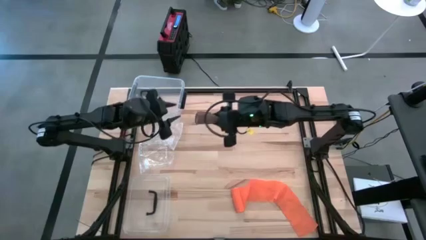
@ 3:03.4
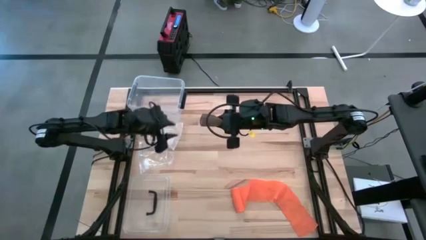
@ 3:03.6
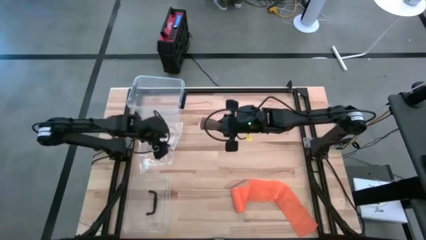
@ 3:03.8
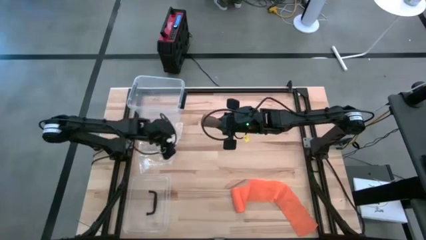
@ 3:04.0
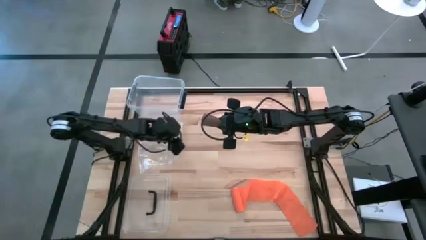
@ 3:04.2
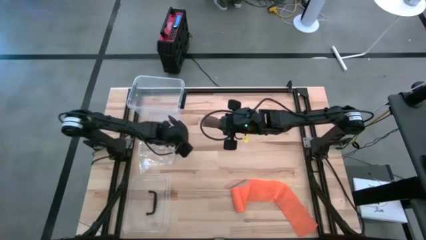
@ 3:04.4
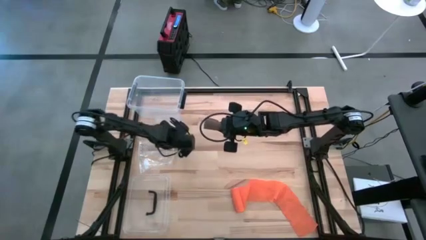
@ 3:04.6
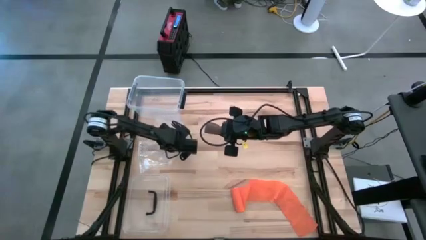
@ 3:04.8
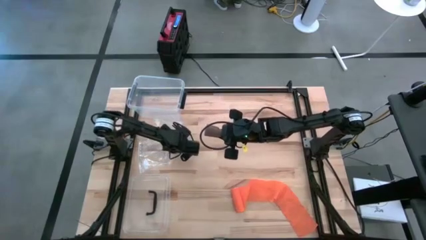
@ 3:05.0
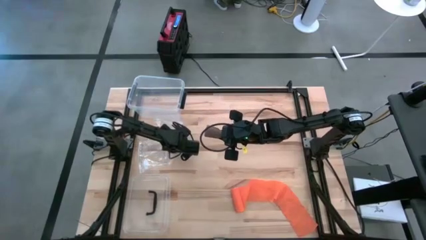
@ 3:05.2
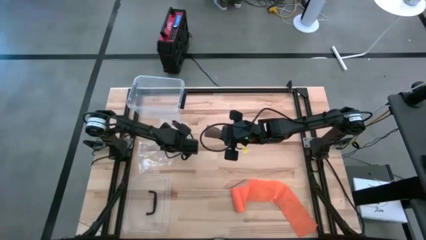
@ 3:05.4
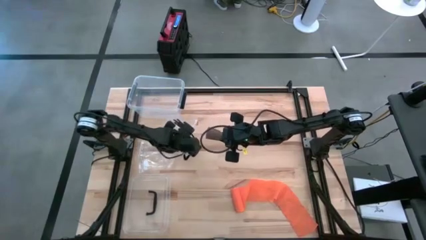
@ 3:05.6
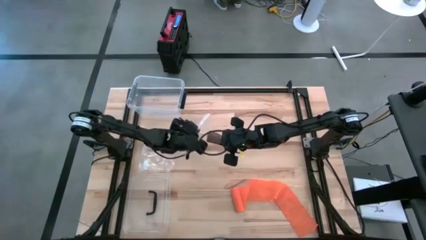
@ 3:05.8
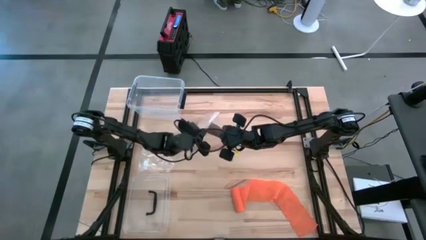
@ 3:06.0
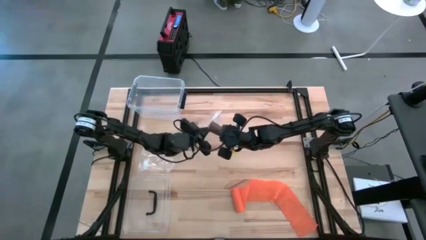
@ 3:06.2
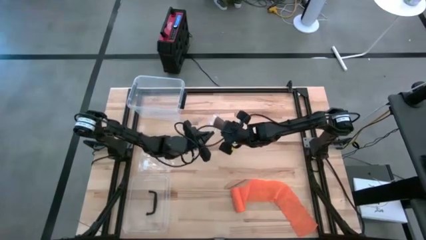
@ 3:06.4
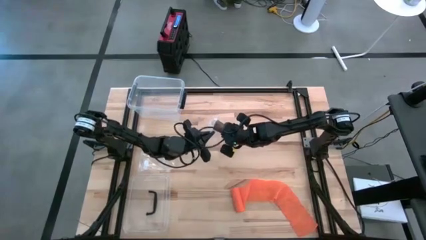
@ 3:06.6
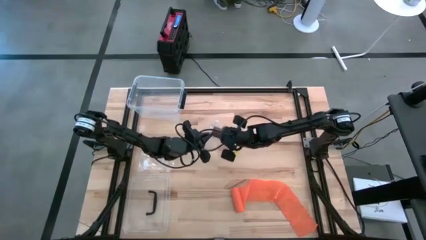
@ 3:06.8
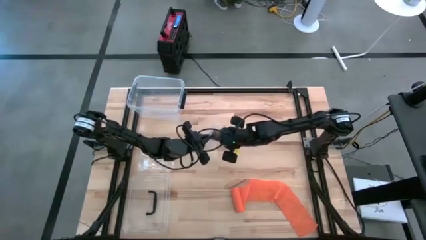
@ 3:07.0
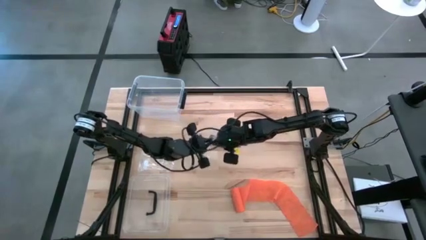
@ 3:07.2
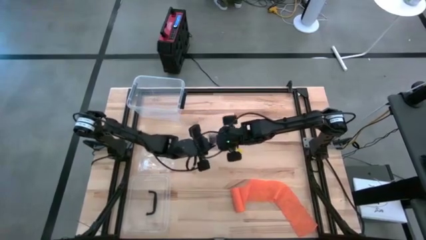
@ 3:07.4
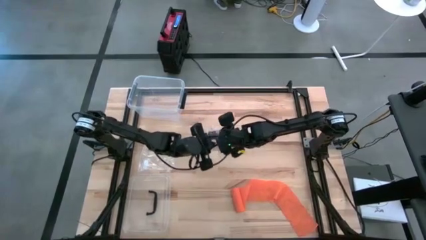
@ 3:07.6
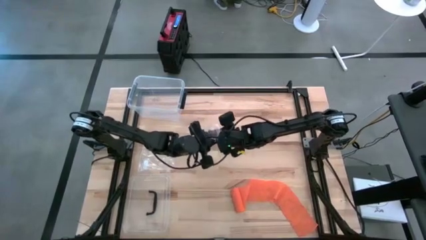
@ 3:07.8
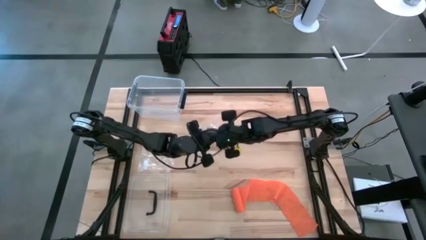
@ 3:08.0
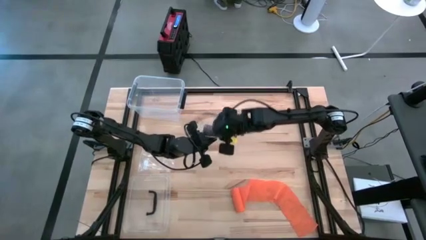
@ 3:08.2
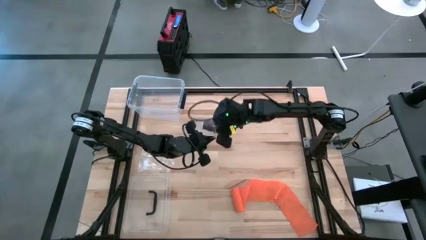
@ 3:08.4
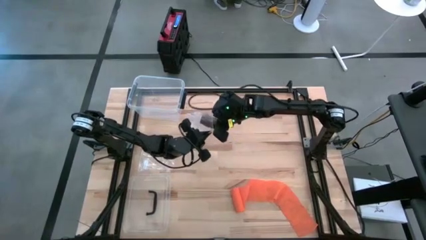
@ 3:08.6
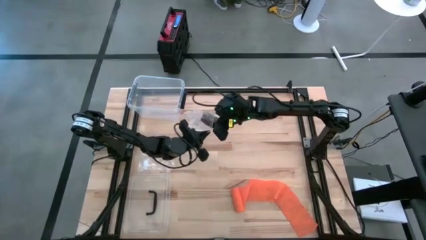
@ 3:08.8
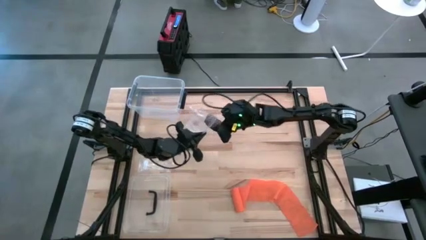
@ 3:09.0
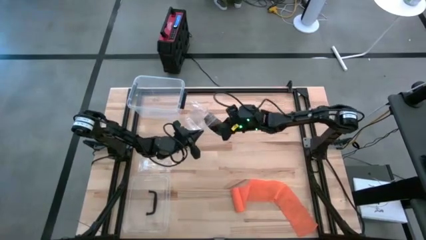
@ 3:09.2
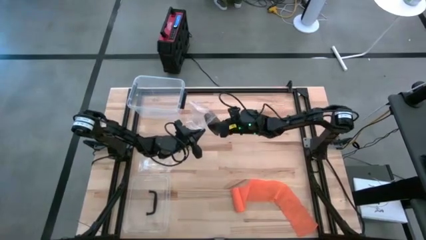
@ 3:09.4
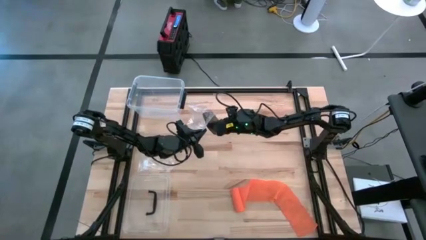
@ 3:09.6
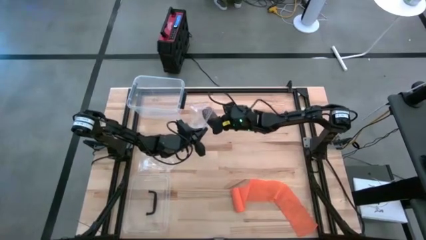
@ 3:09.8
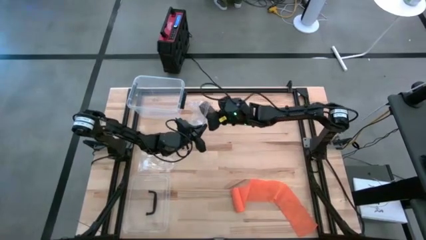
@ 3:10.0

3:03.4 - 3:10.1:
Task: Roll bandage
Put the brown bandage into the zip bag

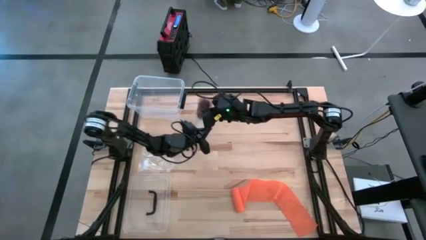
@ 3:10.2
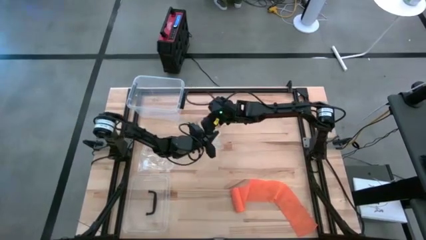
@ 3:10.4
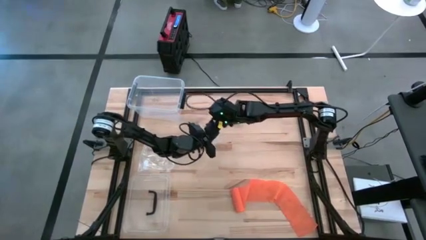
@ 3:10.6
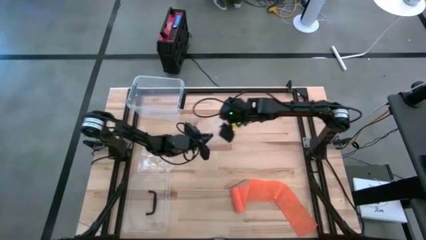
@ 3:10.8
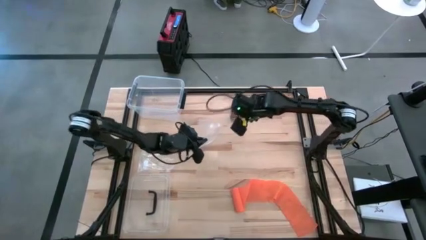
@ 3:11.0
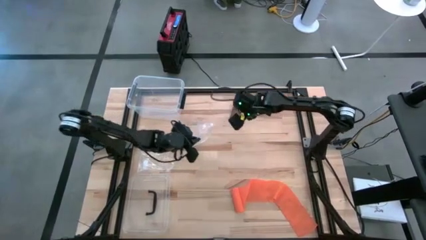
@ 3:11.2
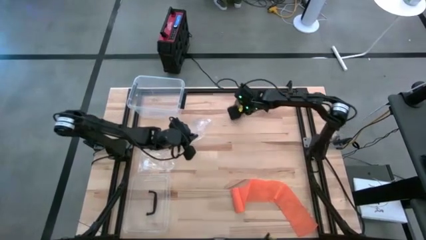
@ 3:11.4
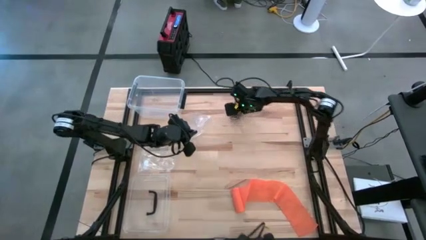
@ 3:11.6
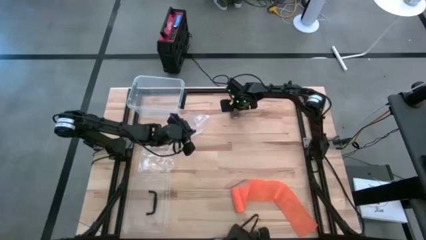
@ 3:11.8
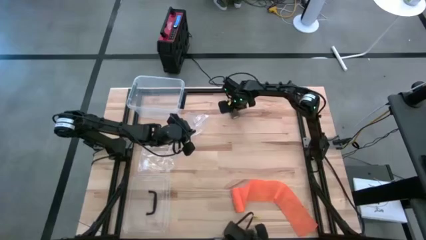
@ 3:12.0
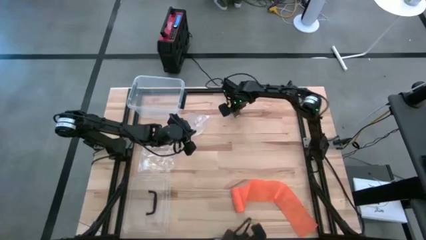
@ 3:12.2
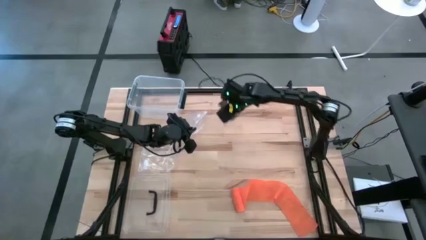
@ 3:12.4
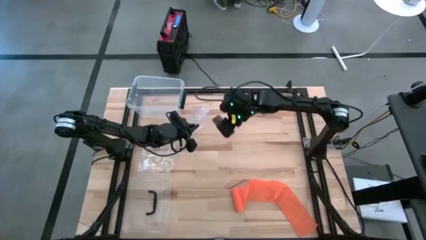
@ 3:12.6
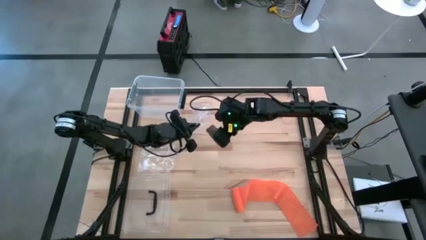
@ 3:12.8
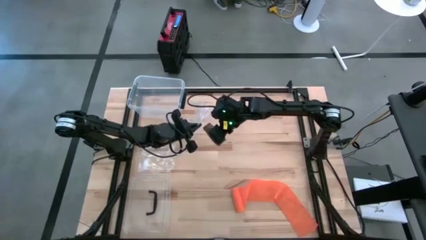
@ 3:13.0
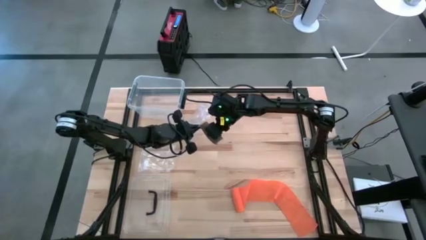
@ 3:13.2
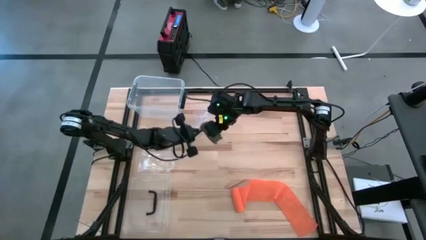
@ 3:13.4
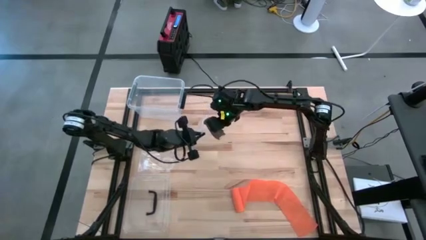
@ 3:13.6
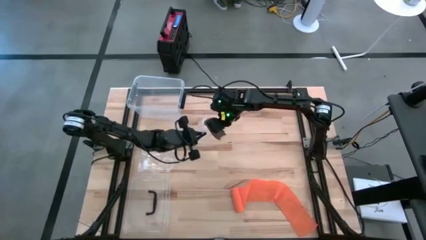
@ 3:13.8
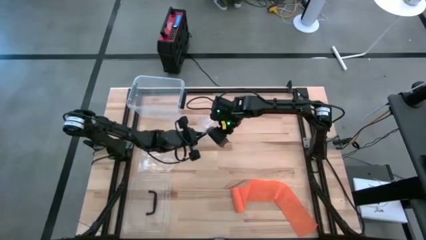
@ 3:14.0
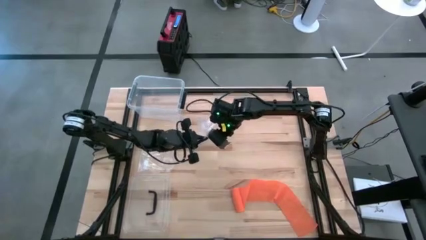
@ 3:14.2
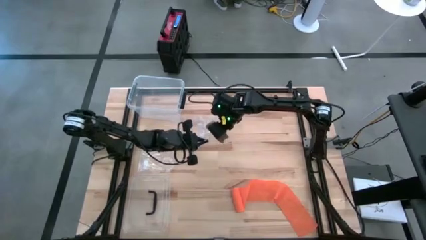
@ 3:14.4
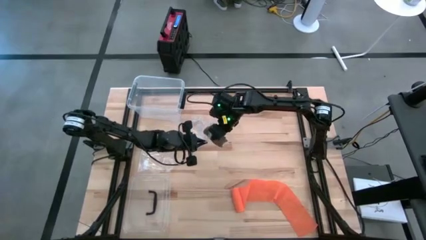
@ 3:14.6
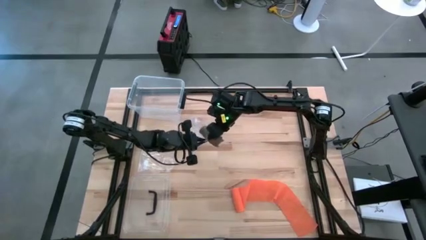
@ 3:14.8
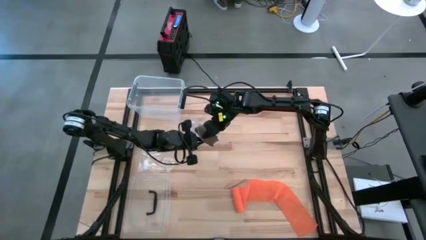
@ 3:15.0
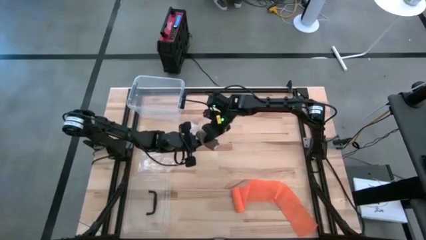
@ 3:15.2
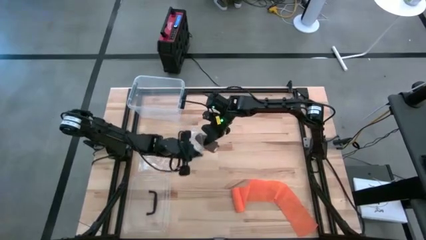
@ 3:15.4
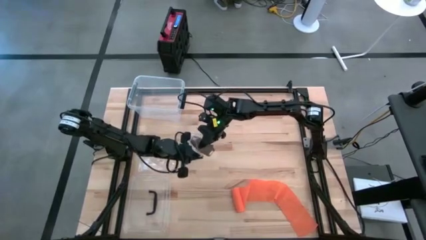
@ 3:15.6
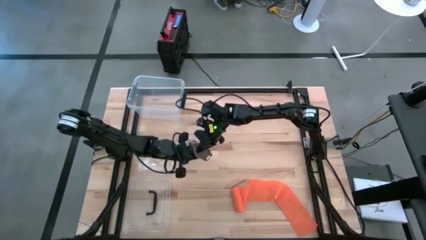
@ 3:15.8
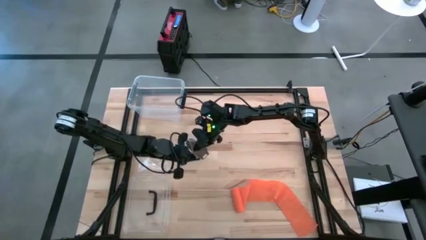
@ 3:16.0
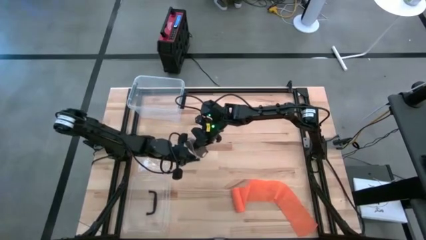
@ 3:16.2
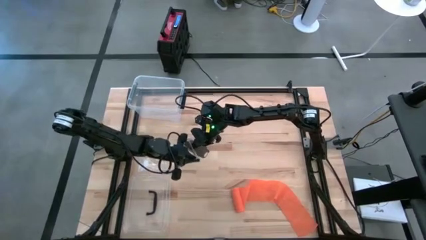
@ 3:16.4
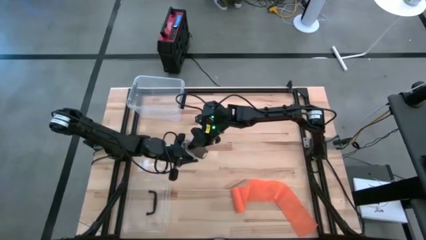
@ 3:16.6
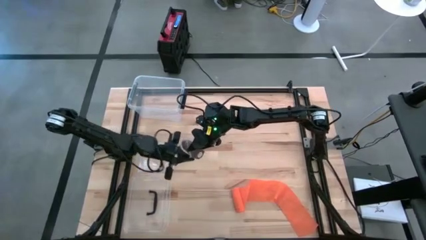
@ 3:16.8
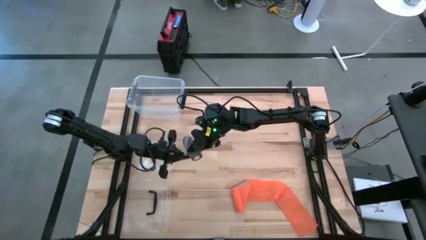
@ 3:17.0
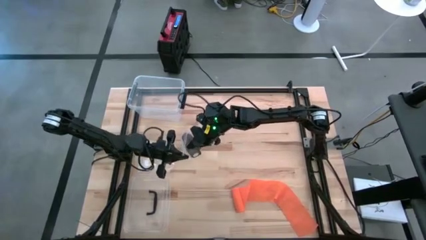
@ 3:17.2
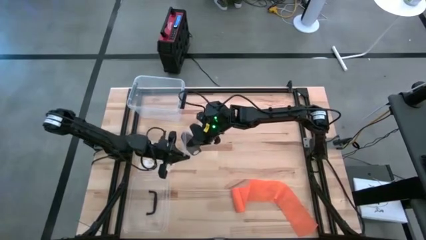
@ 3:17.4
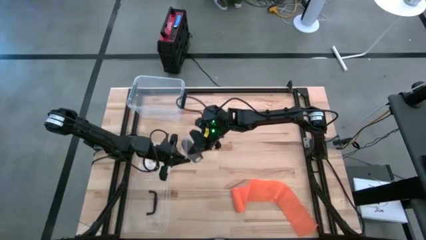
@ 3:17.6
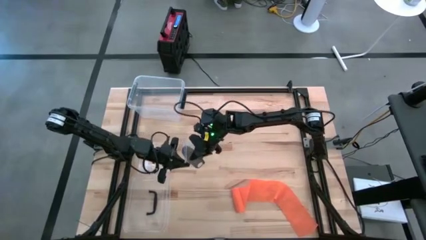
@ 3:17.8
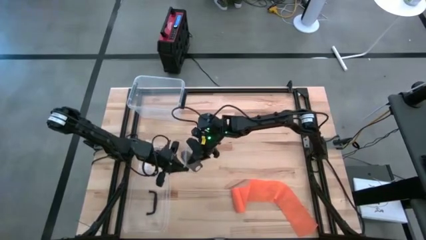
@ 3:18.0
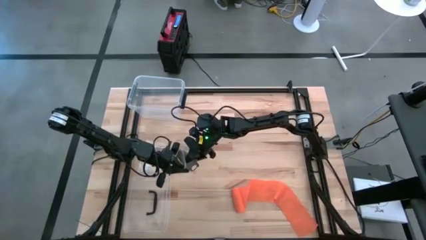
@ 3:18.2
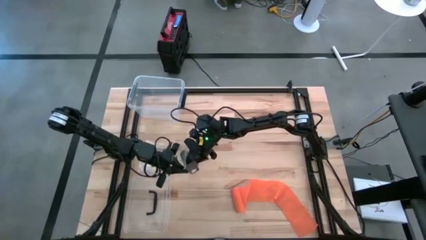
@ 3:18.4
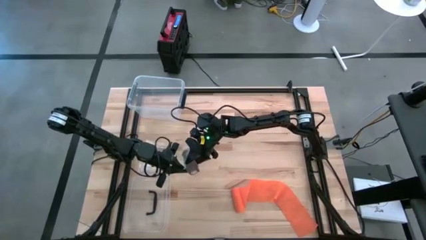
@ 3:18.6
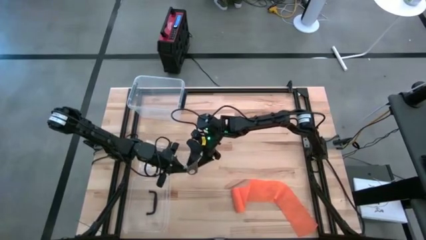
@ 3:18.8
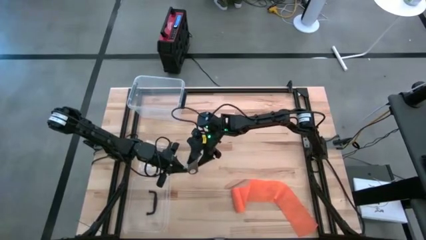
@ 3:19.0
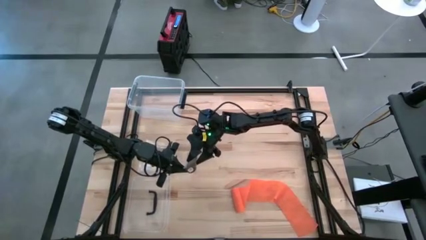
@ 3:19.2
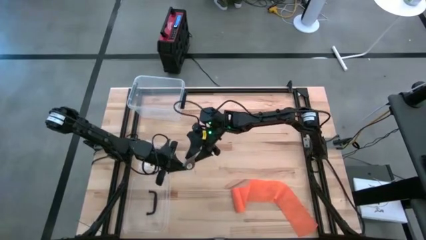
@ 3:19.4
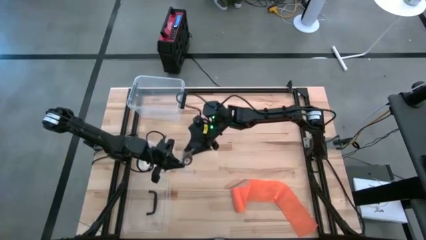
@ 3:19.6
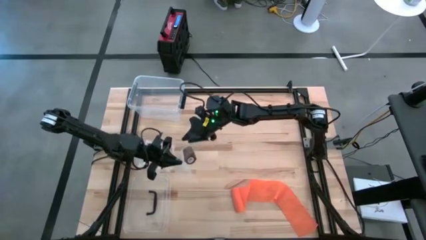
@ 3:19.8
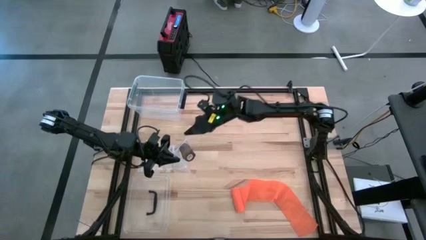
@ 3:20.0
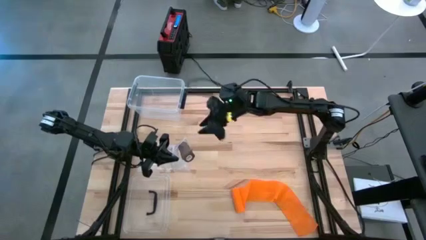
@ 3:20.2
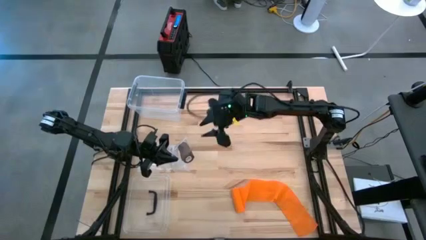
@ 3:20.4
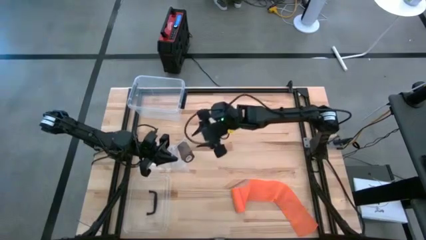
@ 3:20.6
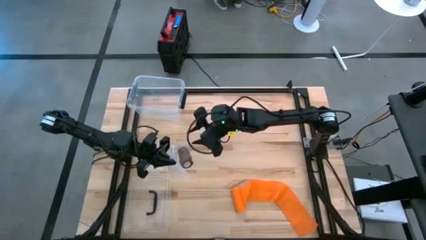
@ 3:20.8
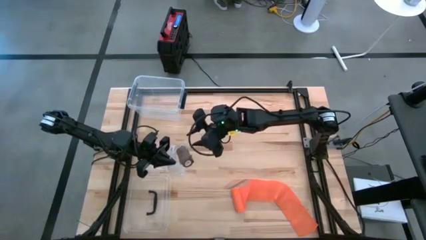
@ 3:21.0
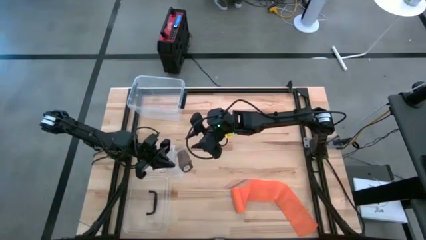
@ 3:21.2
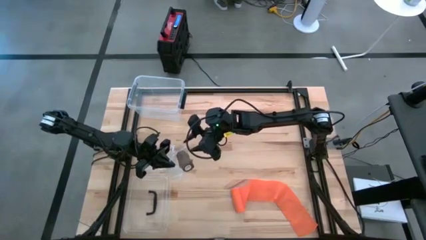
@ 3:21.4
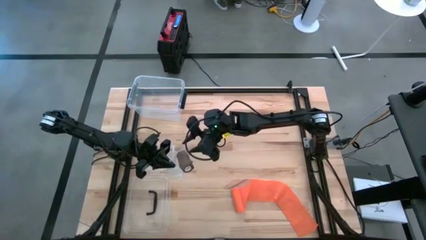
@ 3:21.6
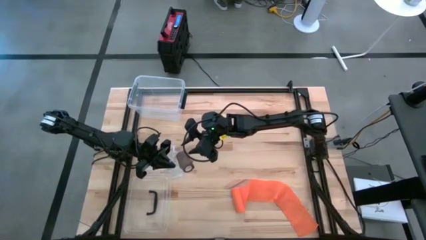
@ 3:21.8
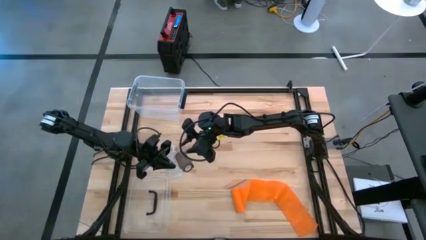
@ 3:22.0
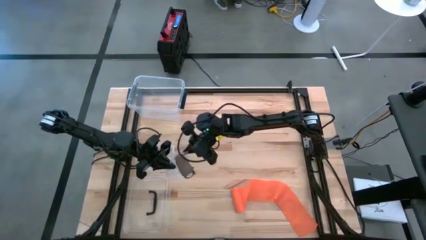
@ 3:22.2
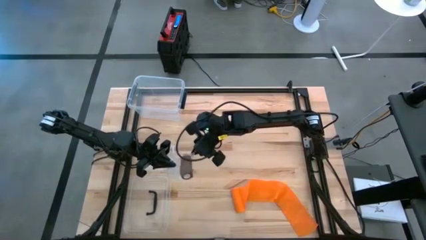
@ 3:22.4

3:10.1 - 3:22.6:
Put the brown bandage into the zip bag
